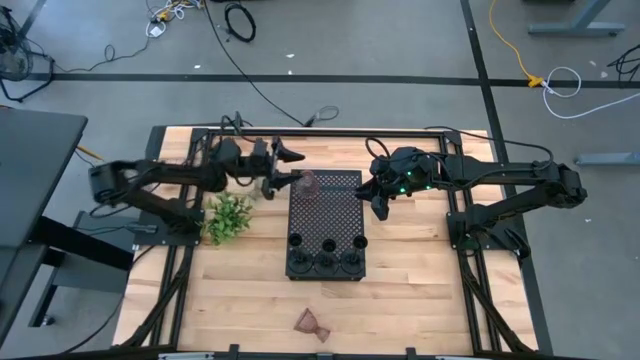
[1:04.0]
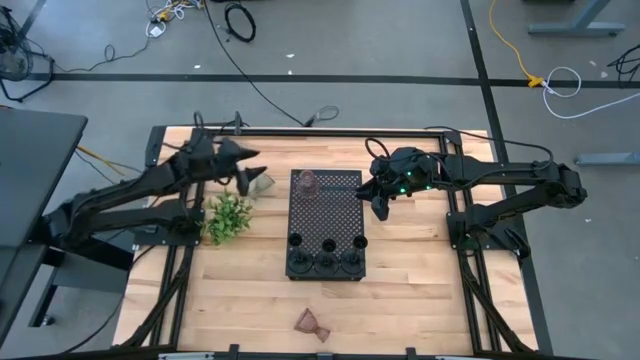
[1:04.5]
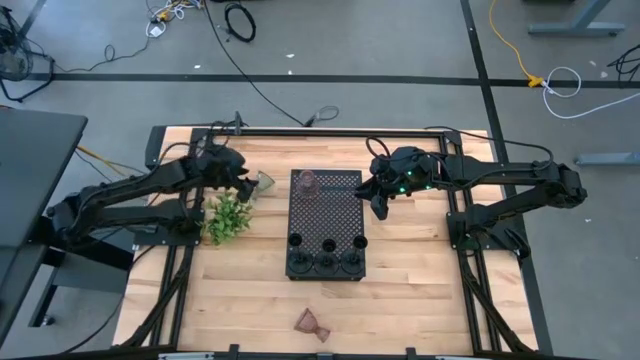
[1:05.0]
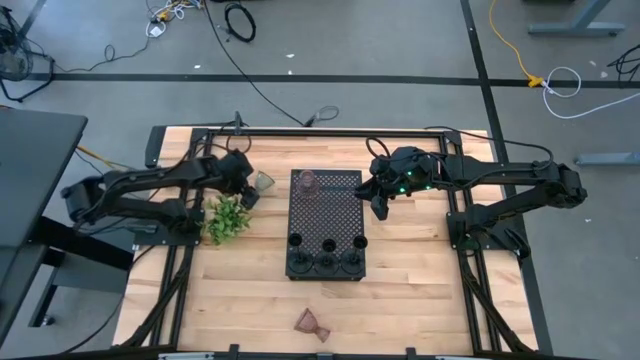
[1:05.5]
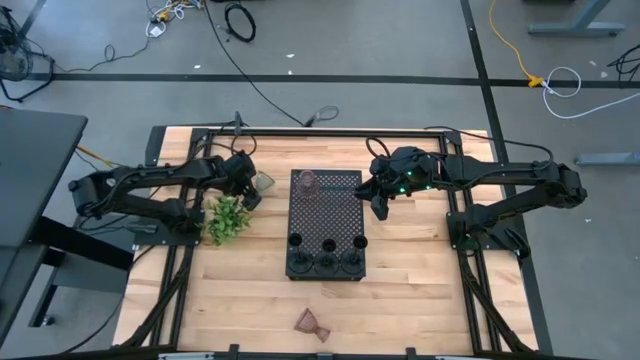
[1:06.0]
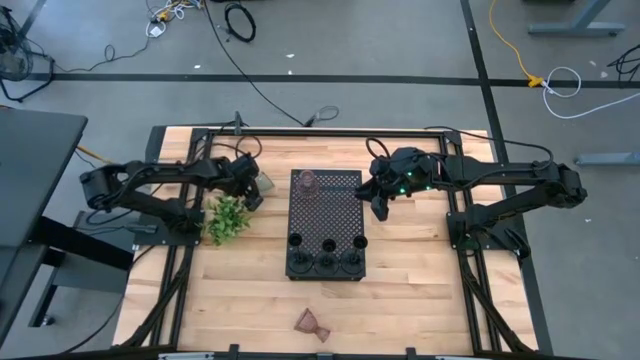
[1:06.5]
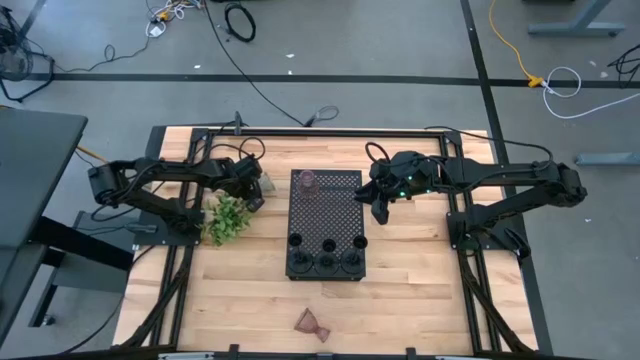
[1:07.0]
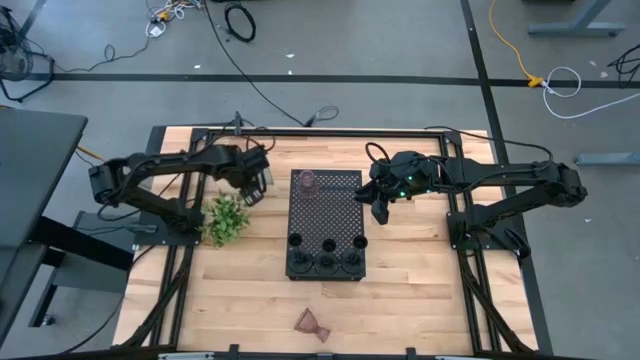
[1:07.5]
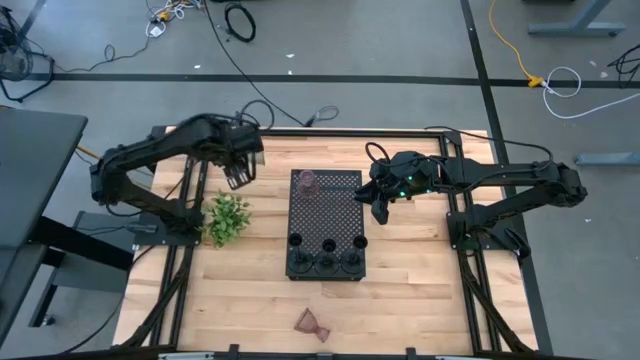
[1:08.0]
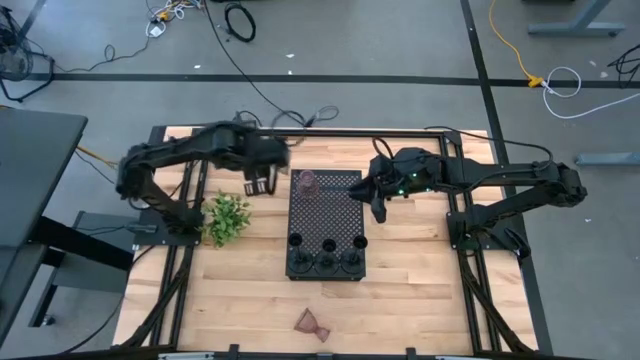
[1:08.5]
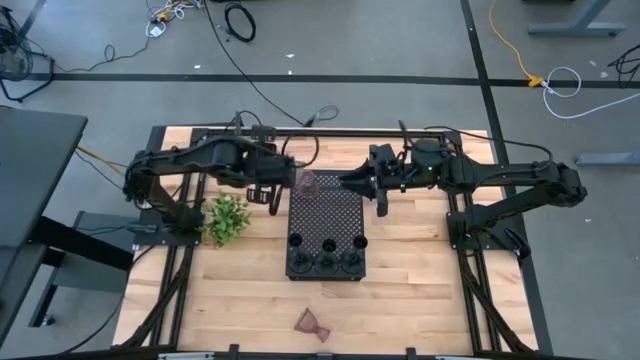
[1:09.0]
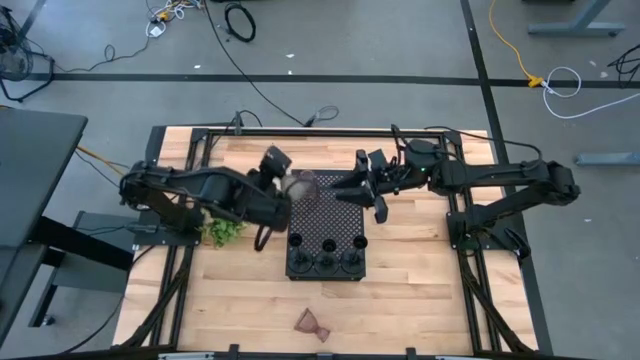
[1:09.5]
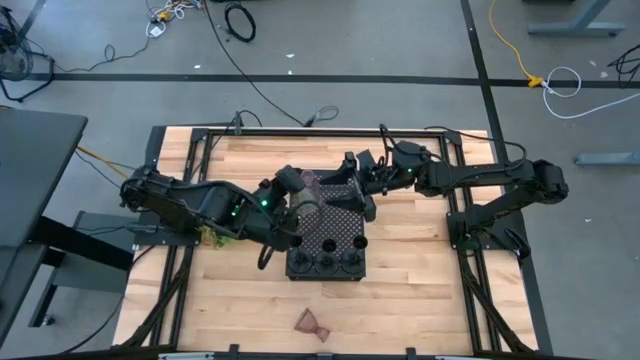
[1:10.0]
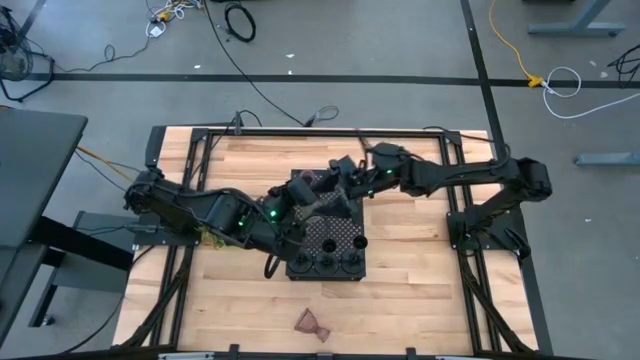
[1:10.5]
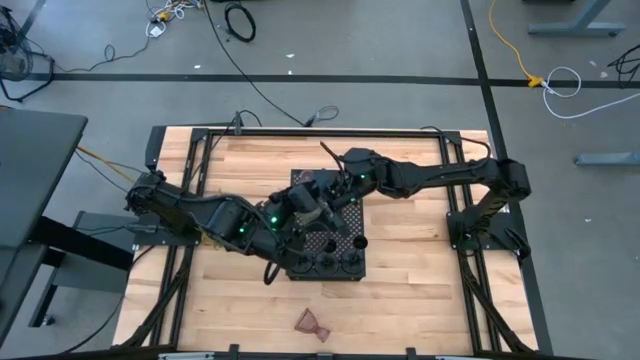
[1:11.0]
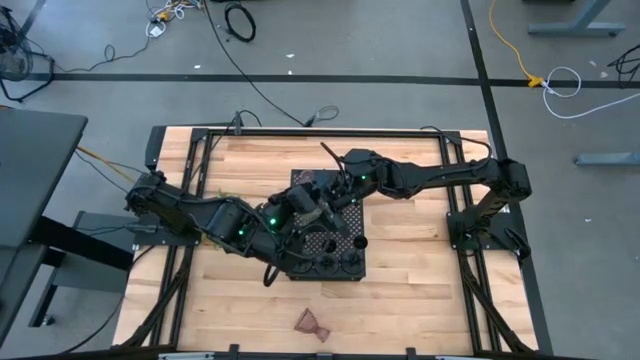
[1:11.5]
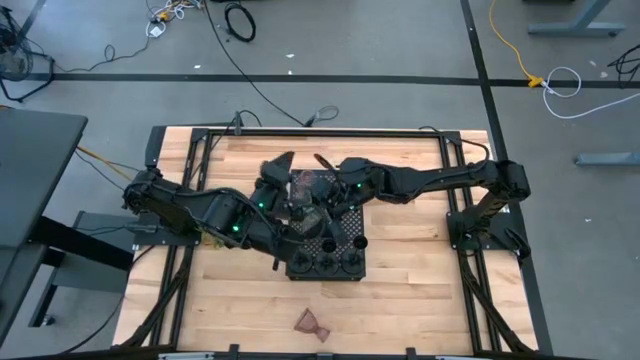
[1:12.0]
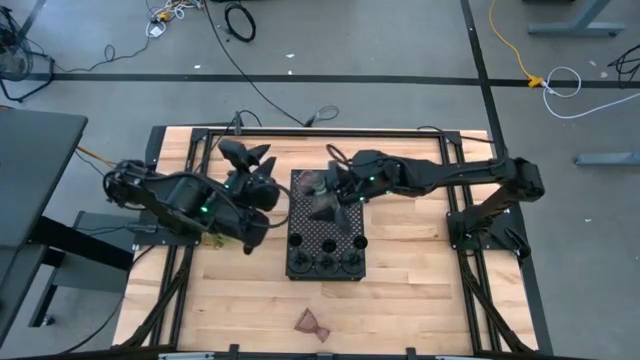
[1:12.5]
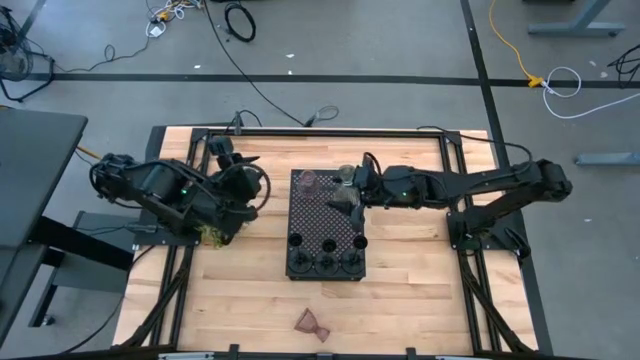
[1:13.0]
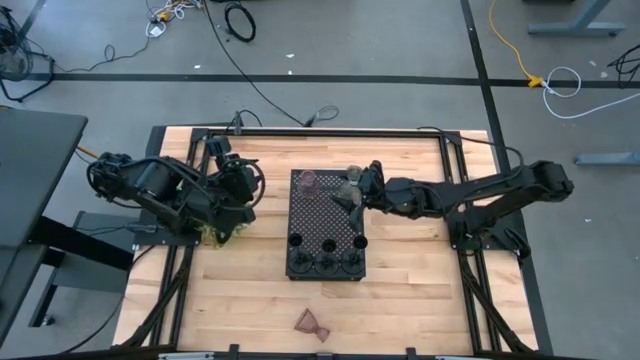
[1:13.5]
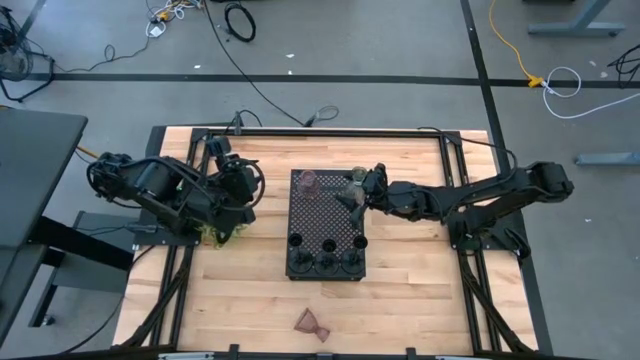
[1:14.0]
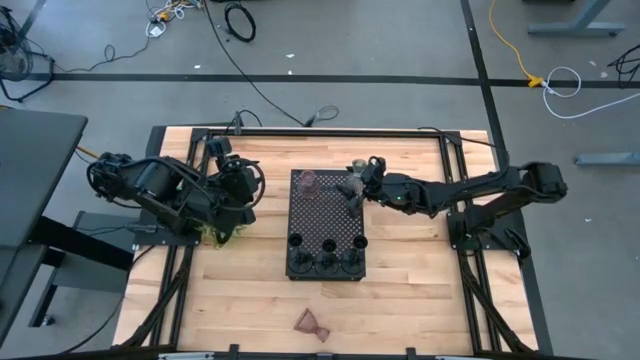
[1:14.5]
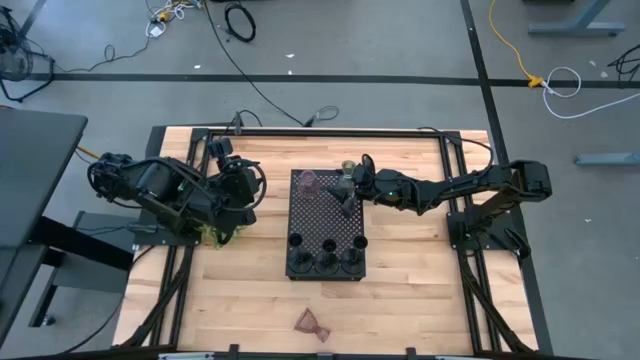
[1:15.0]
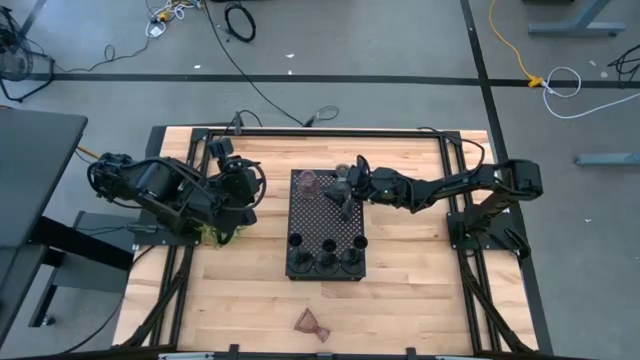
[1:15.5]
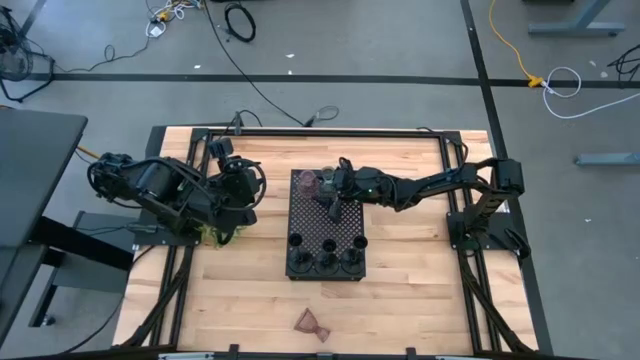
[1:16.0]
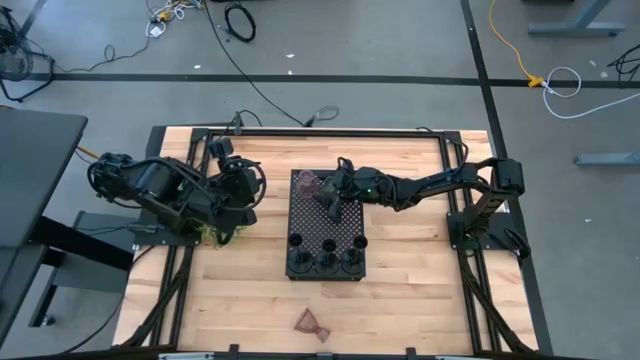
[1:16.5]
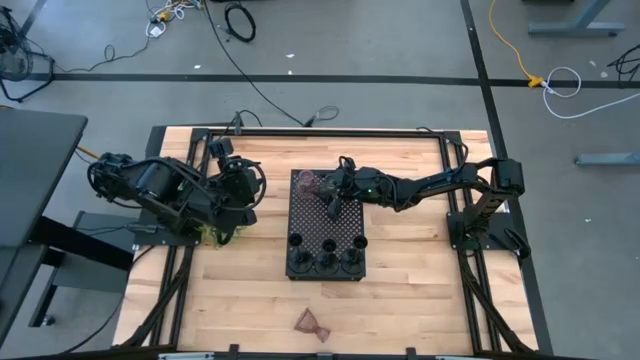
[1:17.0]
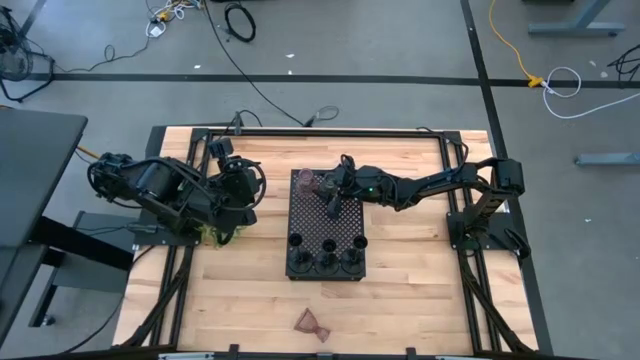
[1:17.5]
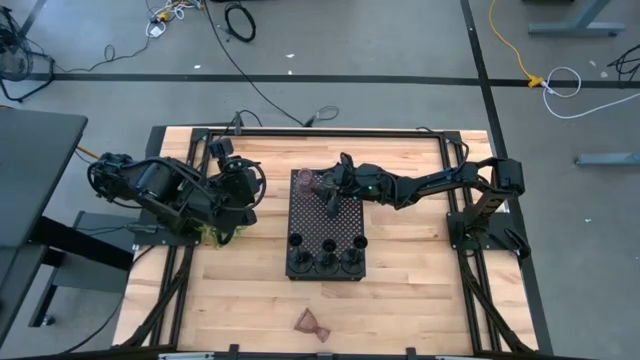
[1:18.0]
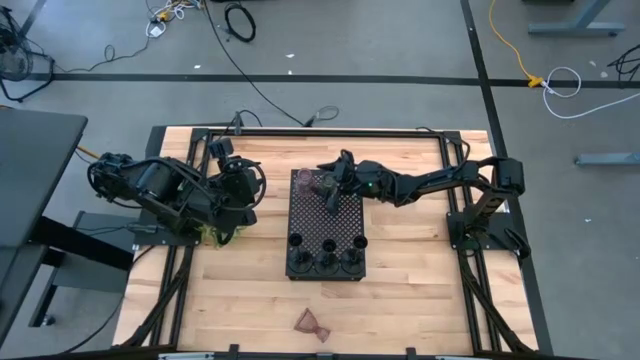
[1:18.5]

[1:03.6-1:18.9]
Task: Pick & Place candle stick holders
Put the green glass candle holder on the shelf

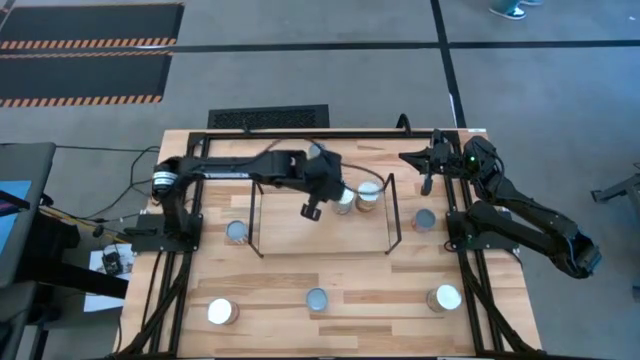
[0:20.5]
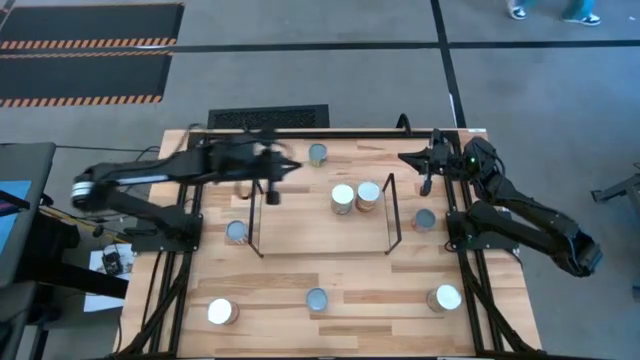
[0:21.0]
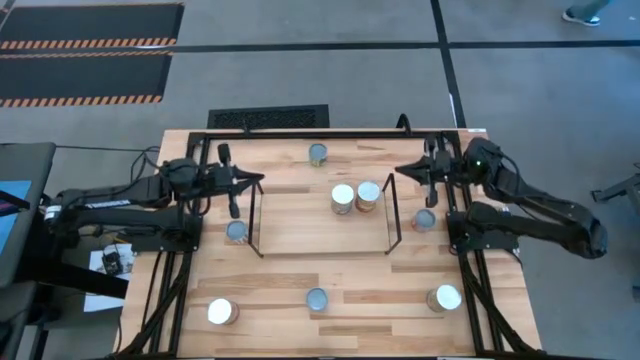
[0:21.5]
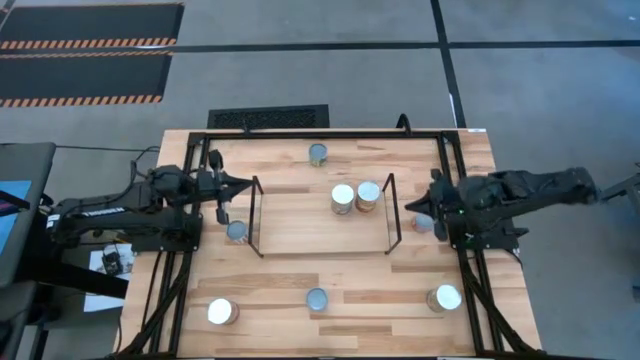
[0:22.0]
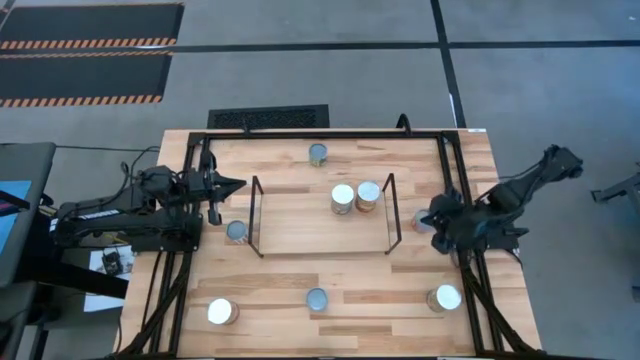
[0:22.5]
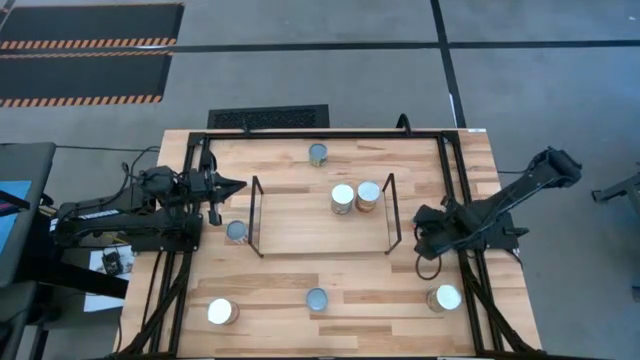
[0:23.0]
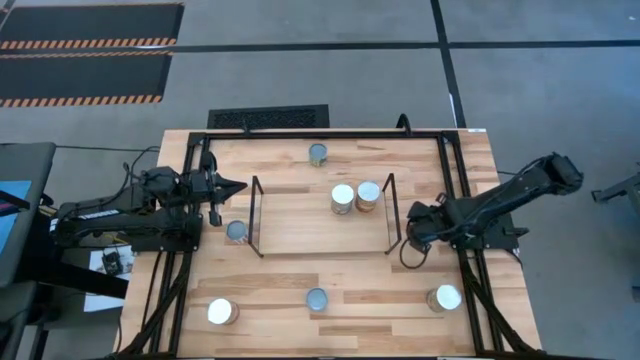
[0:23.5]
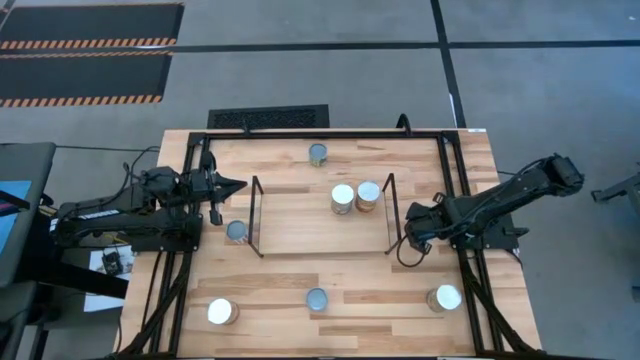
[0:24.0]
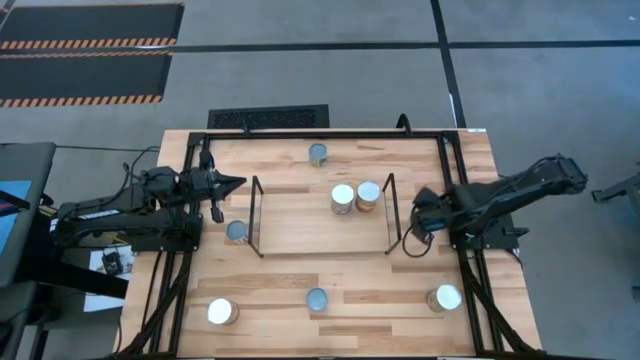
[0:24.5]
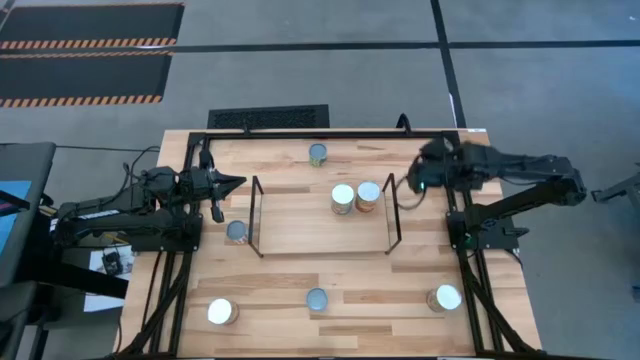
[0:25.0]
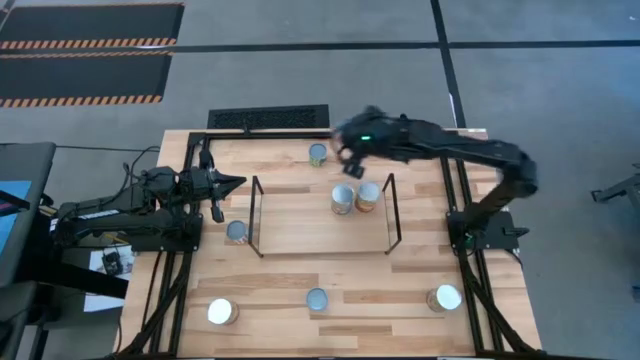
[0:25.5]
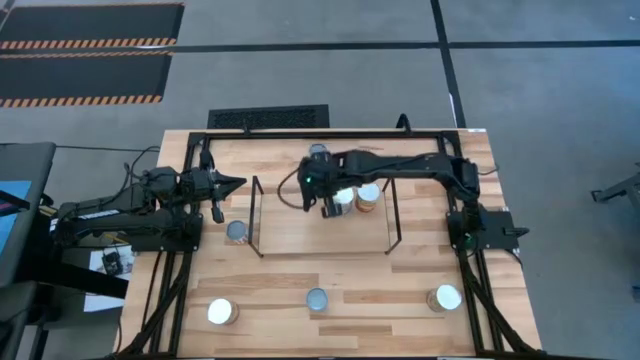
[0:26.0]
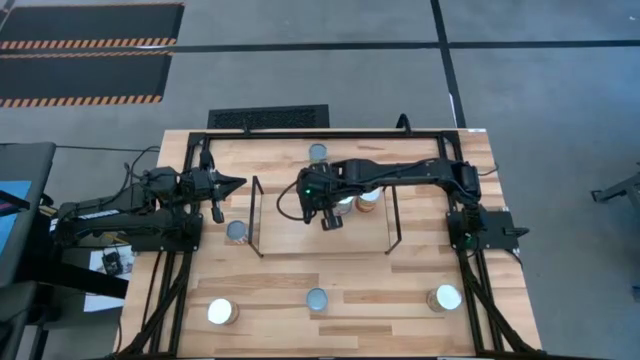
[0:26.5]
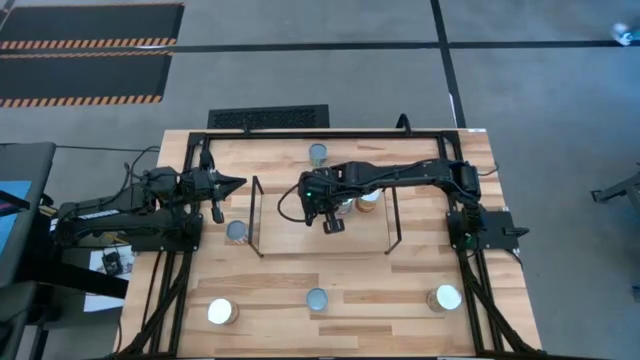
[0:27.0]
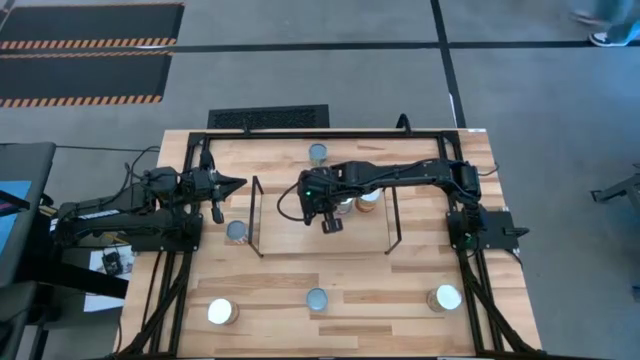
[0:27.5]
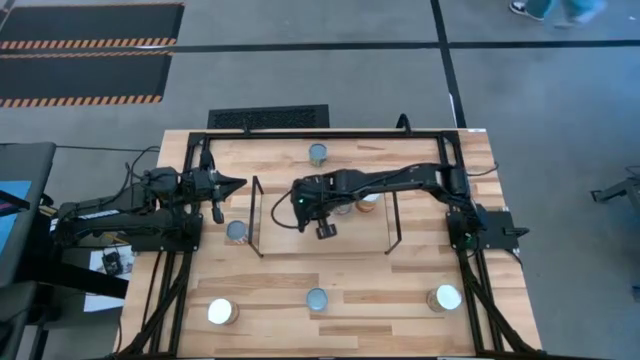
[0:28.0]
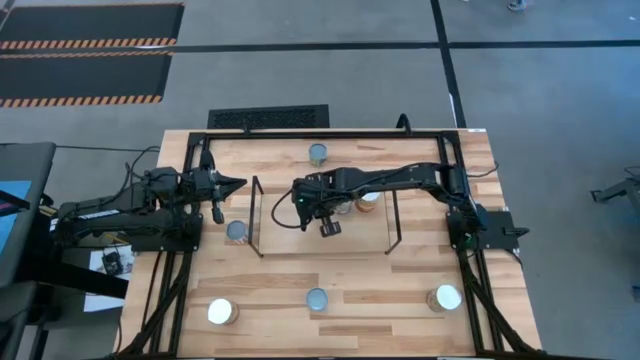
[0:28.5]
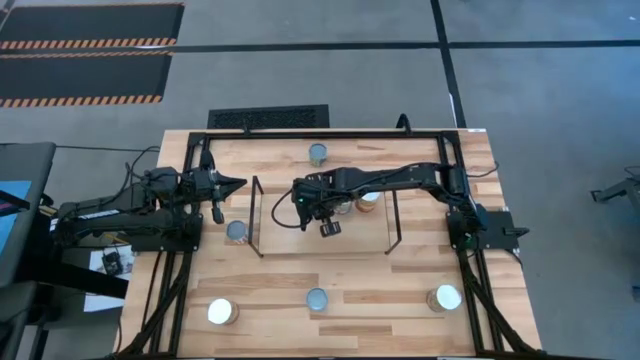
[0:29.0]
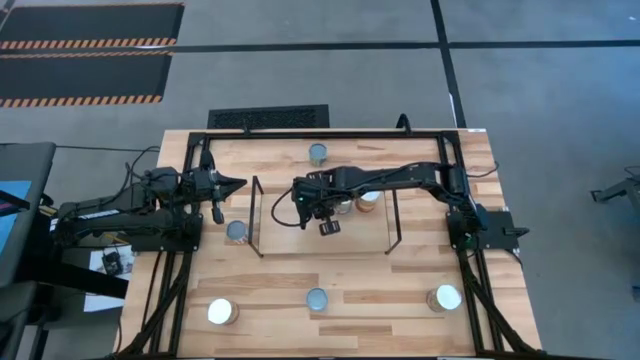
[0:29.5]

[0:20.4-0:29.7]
Task: Pick and place cans onto a shelf
Put the small canned corn on the shelf
